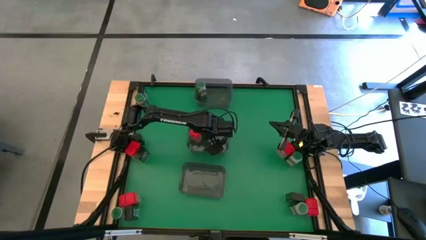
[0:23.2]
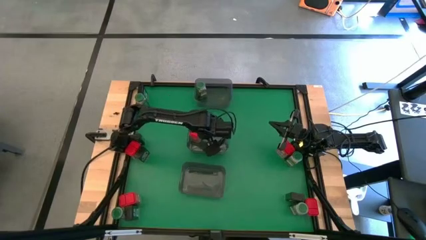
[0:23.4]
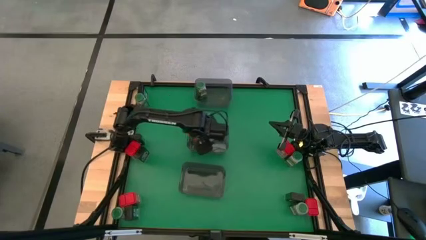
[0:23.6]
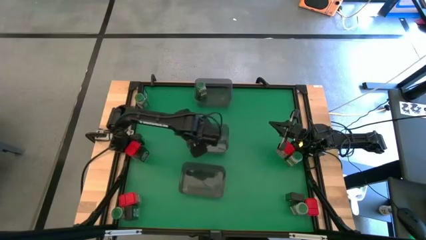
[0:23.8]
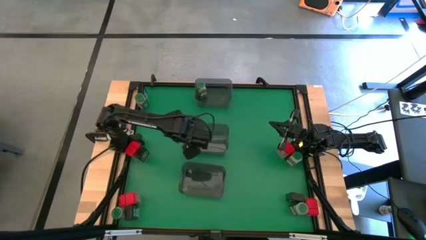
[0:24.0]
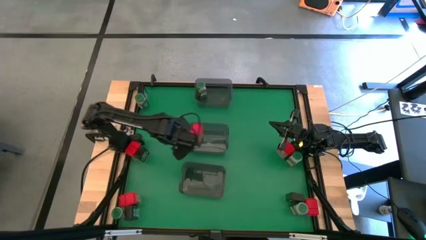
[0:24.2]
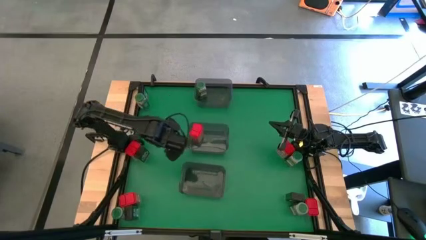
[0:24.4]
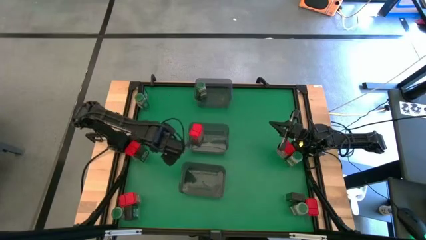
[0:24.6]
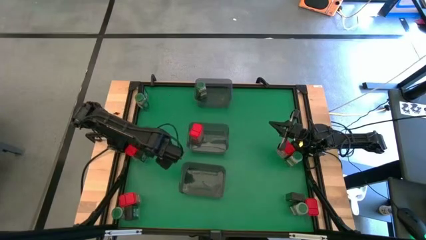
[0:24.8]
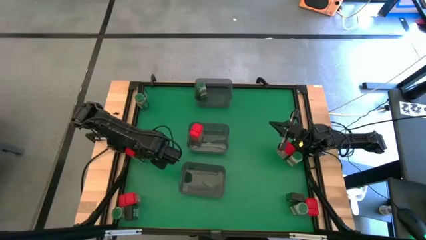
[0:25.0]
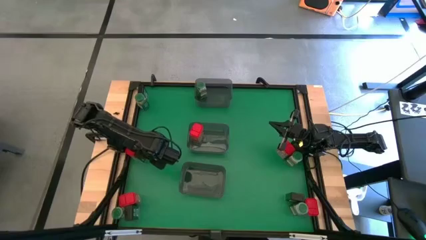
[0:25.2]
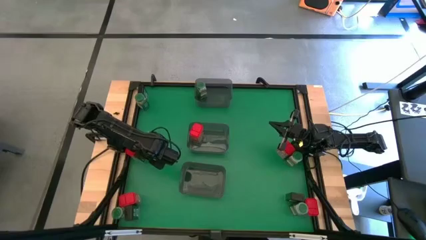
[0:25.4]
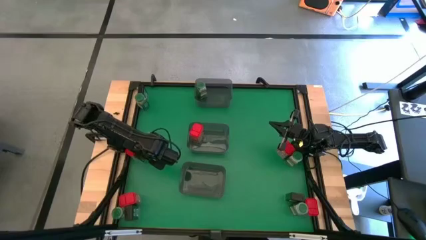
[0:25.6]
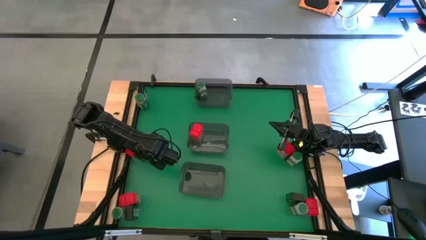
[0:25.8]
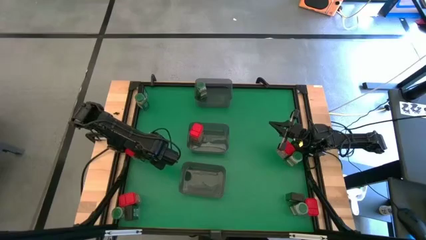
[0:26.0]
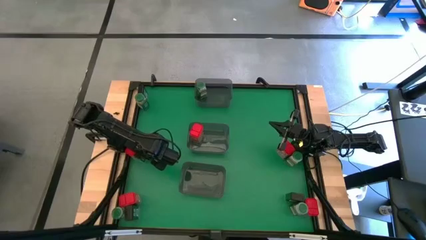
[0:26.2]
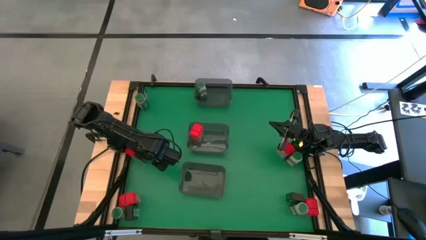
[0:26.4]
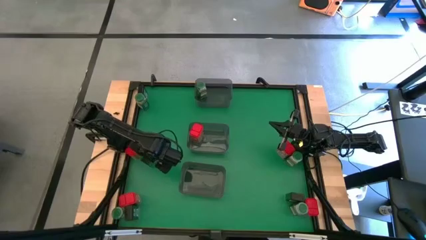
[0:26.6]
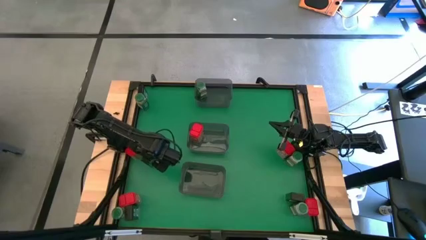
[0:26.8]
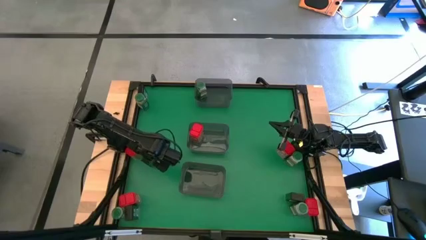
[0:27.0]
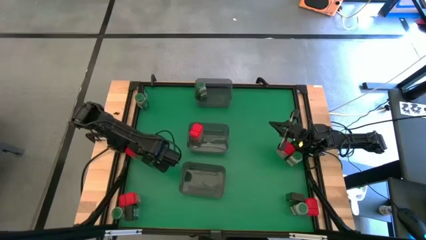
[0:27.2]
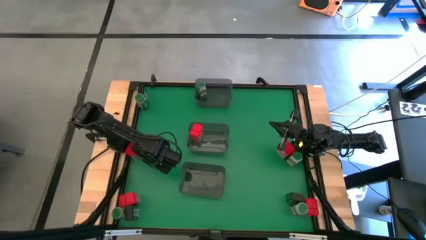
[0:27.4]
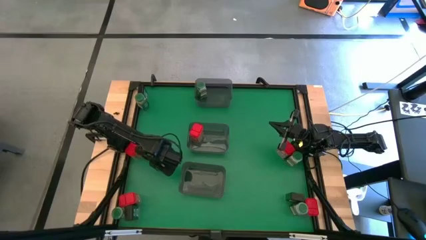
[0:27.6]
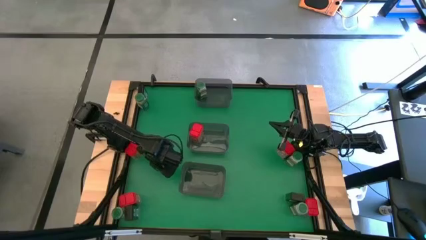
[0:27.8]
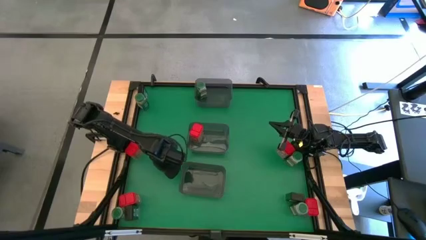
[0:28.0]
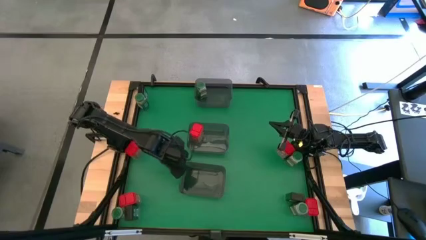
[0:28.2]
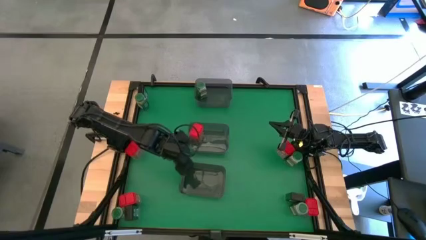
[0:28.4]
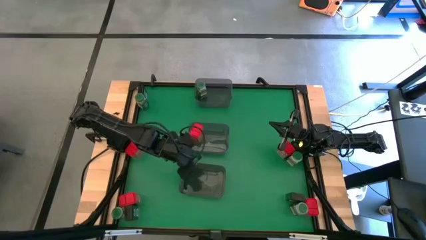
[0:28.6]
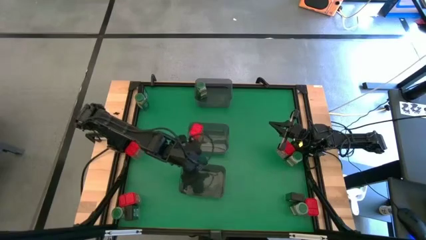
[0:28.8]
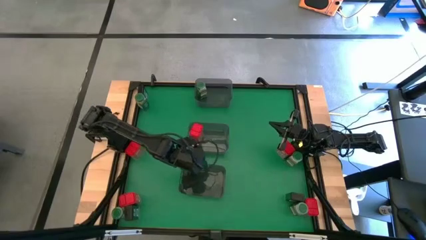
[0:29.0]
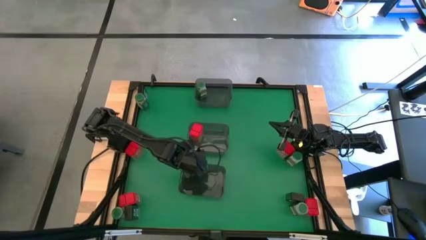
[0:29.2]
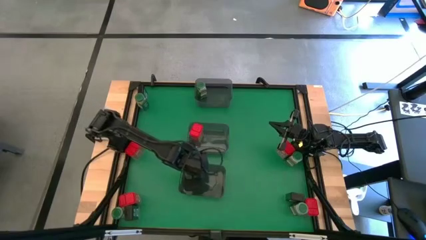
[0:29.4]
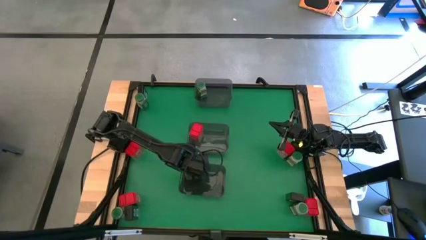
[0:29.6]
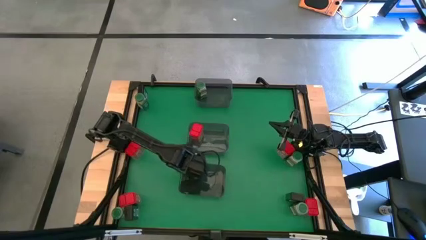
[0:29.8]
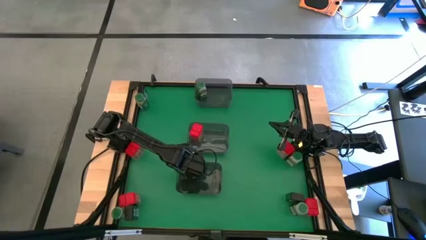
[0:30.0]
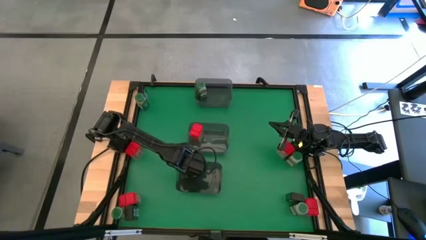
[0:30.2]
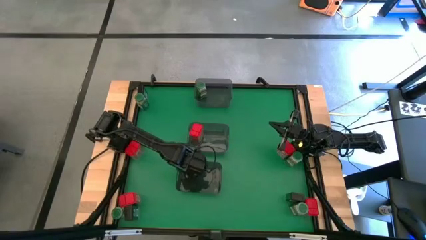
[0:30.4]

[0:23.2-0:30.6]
Task: Sort spices by type
Put the black seasoning can into the bottom gray bin

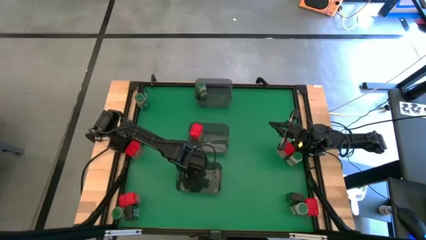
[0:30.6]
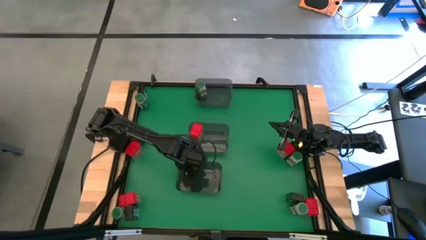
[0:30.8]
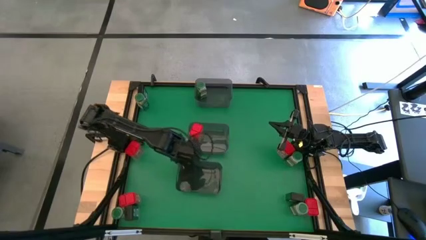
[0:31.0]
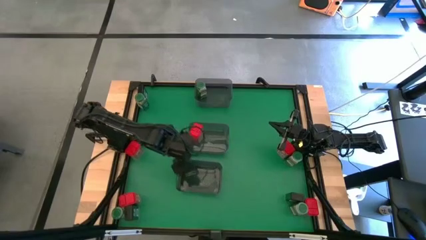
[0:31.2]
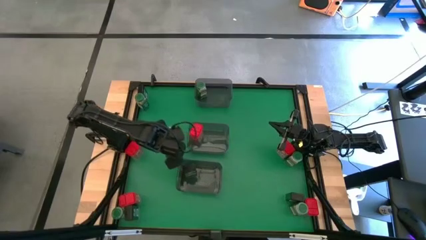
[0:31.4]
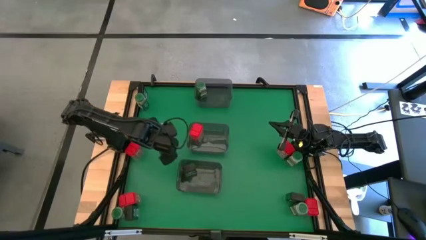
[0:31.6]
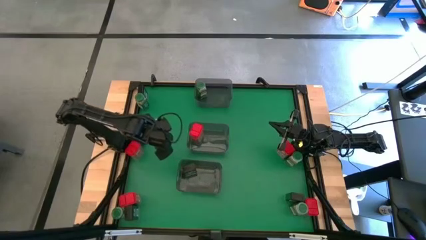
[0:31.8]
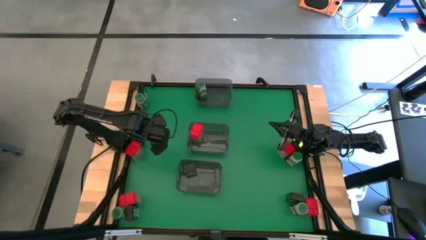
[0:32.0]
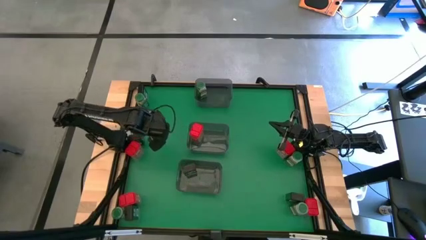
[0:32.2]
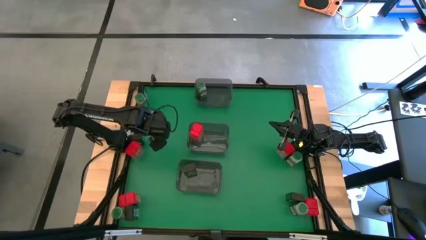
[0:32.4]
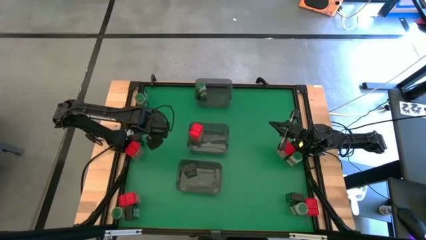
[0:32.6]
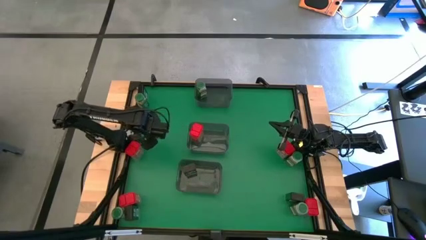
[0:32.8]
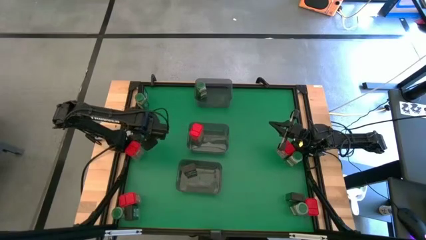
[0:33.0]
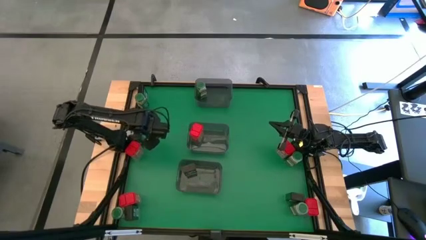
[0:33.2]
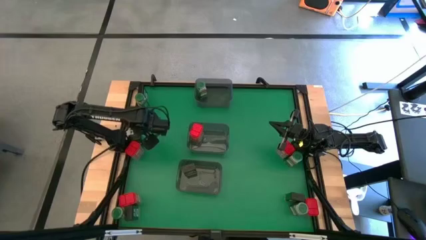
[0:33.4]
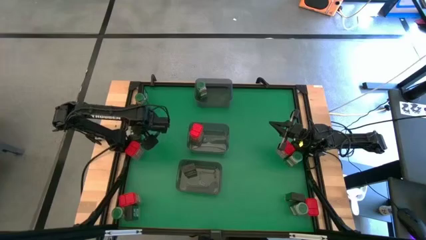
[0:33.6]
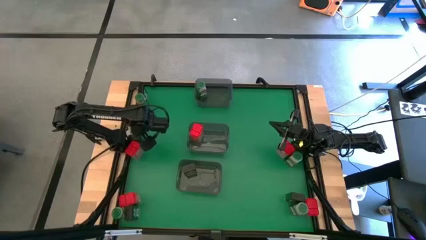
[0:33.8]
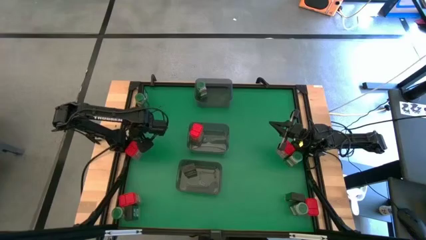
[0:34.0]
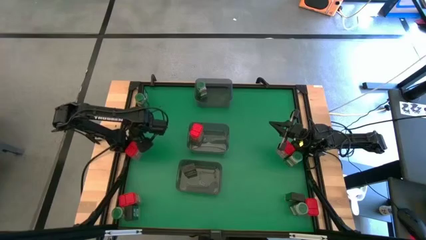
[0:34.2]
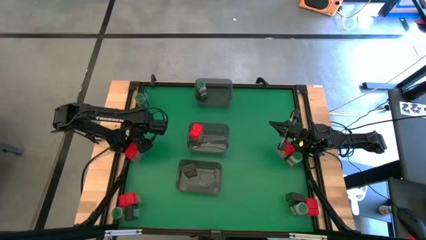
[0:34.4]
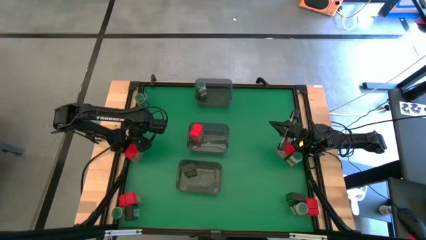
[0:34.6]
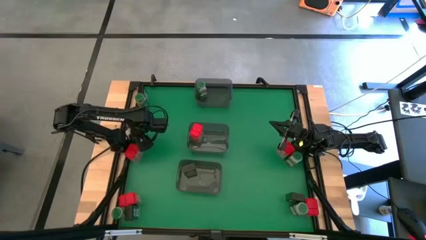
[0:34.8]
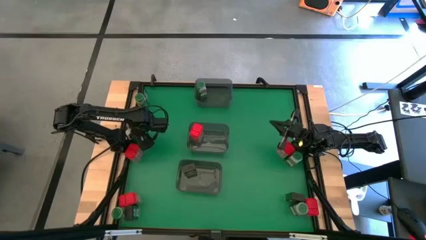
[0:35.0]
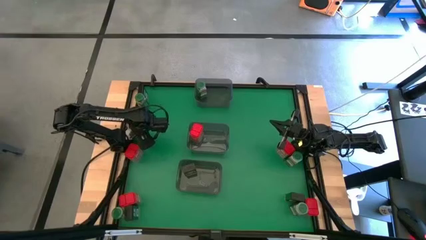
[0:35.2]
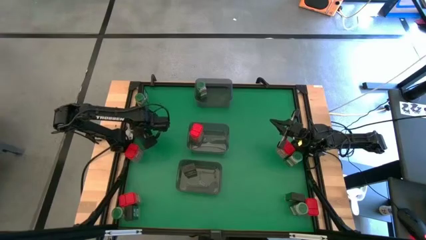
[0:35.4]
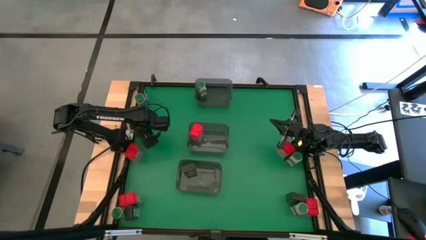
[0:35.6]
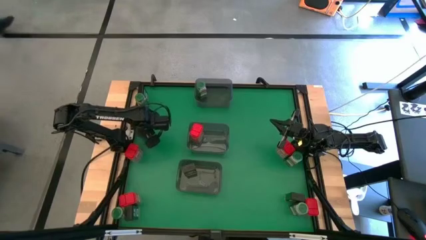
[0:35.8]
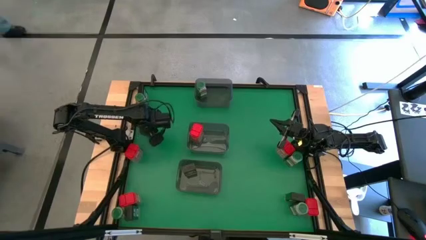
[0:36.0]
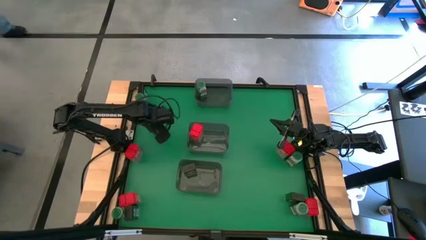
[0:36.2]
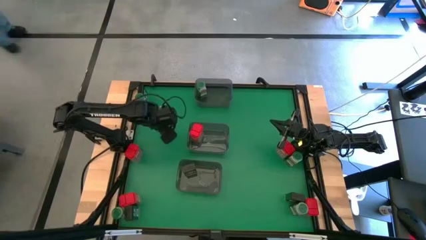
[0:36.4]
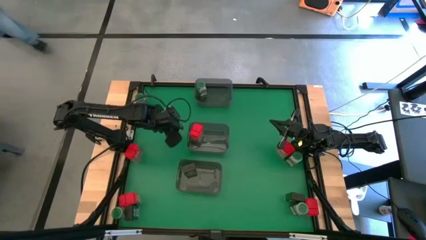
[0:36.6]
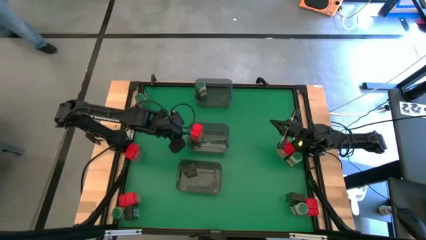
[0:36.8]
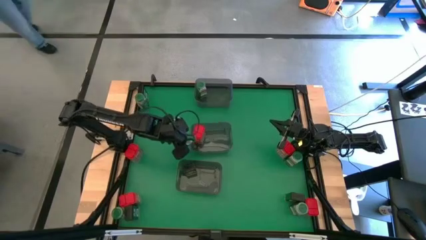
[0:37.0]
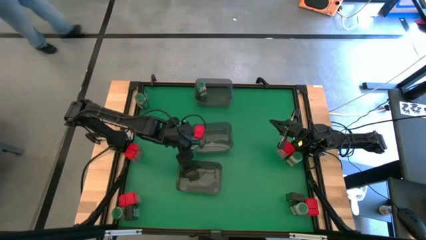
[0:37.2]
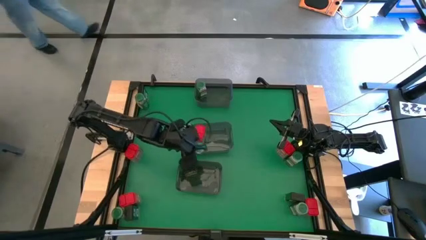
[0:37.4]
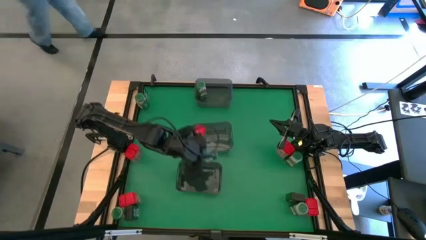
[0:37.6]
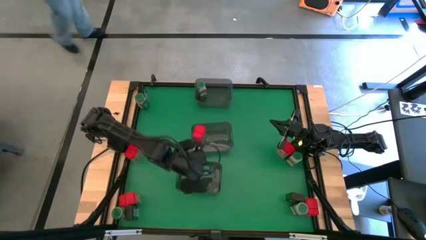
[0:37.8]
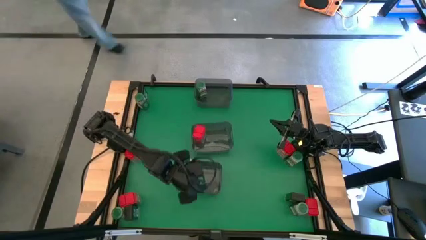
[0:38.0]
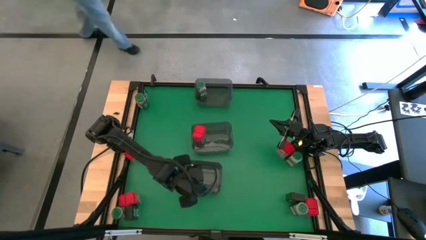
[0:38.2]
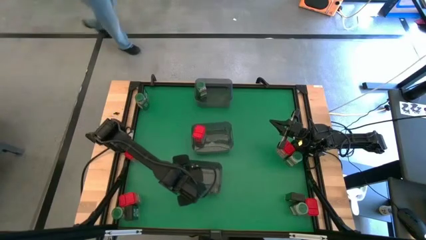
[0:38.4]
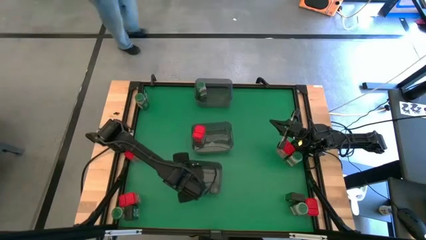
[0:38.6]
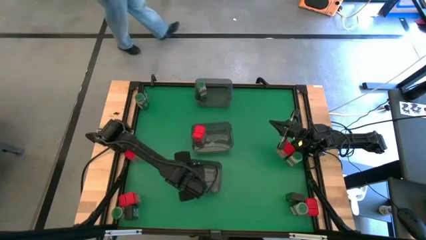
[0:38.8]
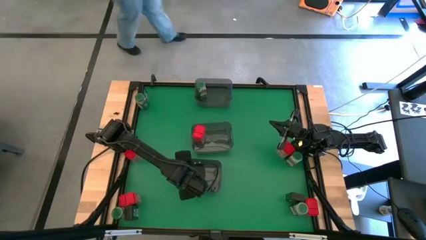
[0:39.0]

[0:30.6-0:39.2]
Put the black seasoning can into the bottom gray bin
